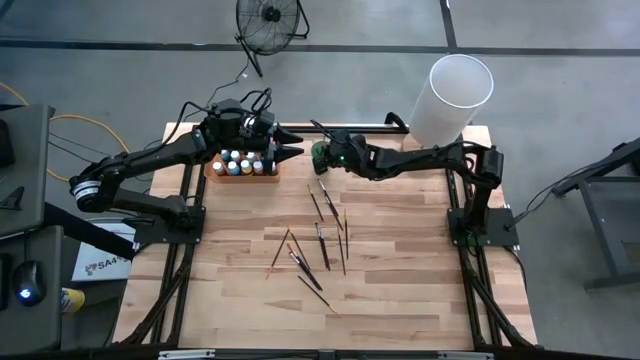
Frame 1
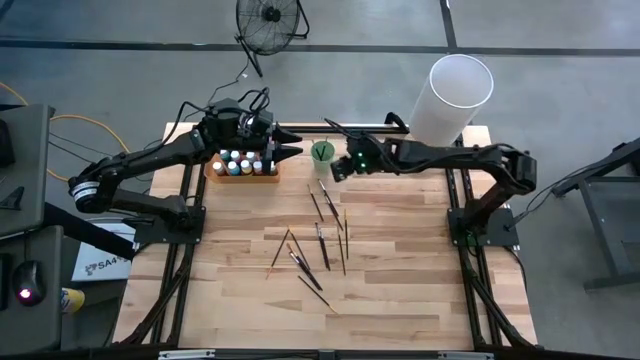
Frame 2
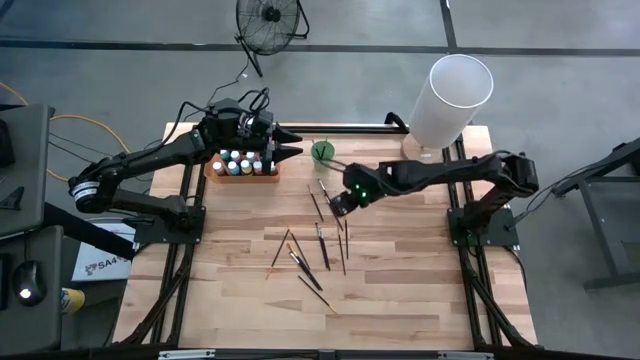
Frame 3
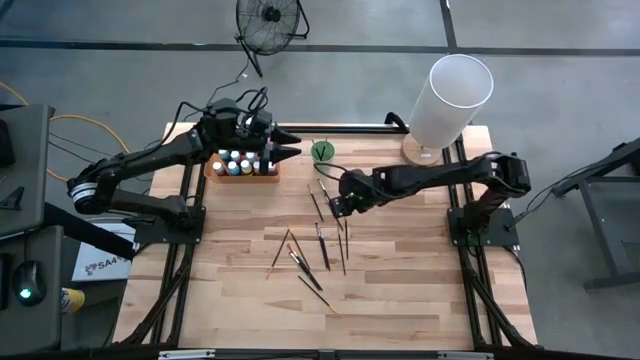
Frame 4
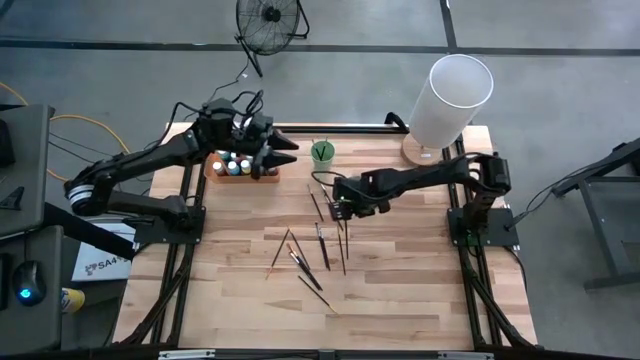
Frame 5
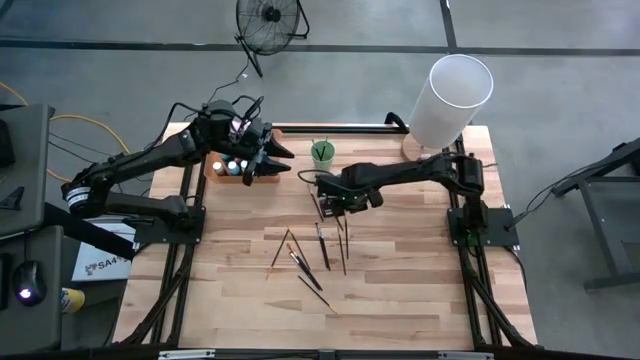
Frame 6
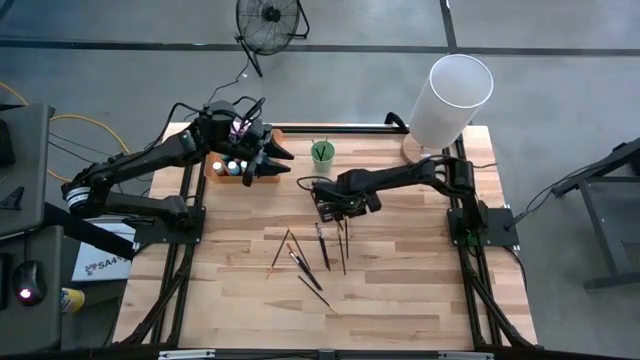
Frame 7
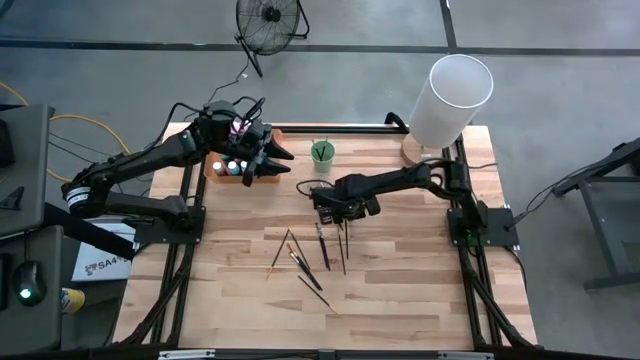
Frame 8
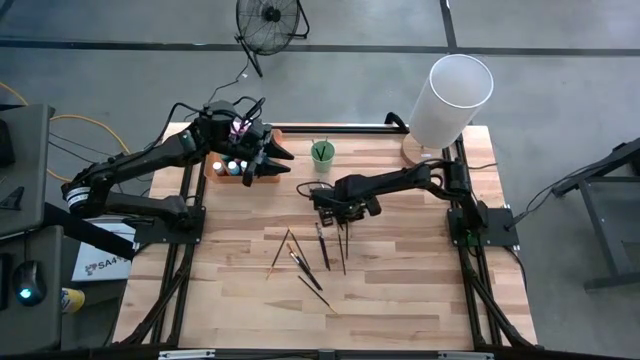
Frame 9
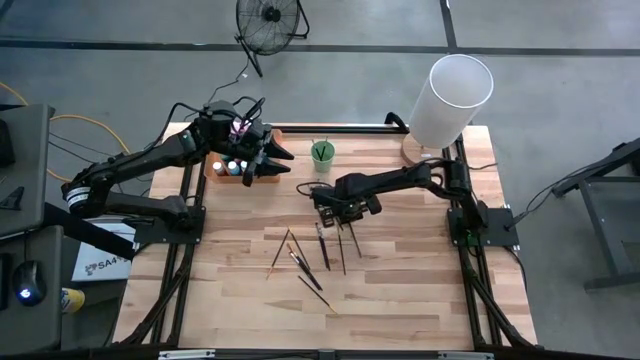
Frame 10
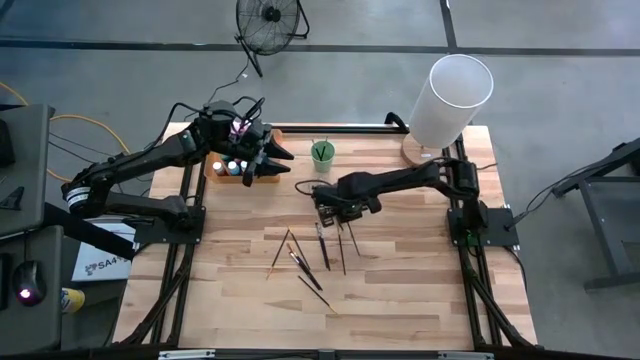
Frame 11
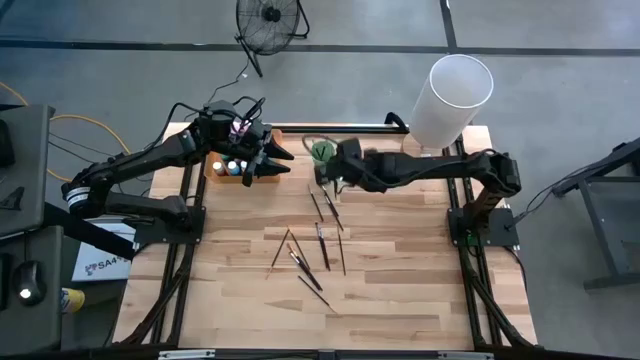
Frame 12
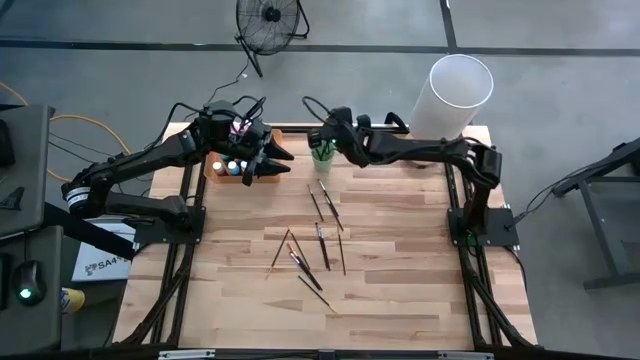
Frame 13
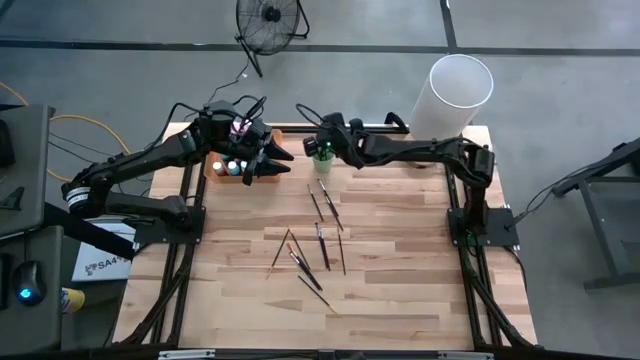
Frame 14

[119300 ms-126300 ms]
Task: Pick & Place Paint Supplies
Put the black paint brush into the green cup

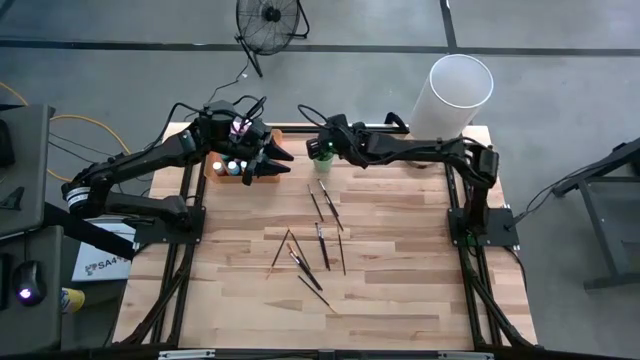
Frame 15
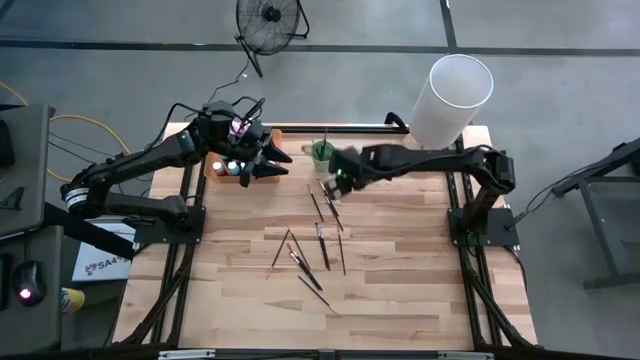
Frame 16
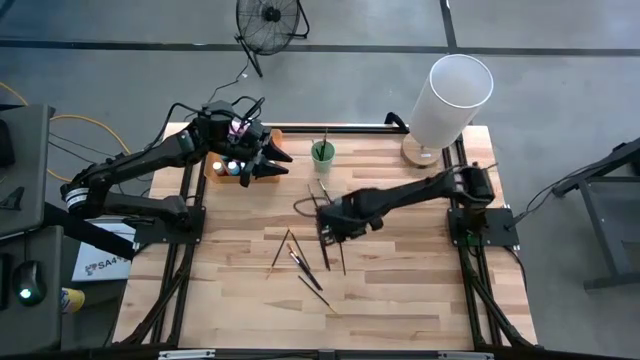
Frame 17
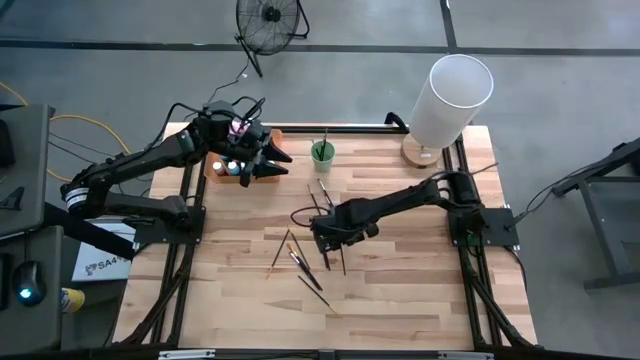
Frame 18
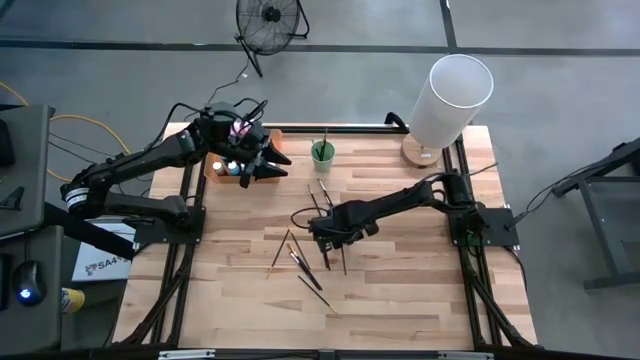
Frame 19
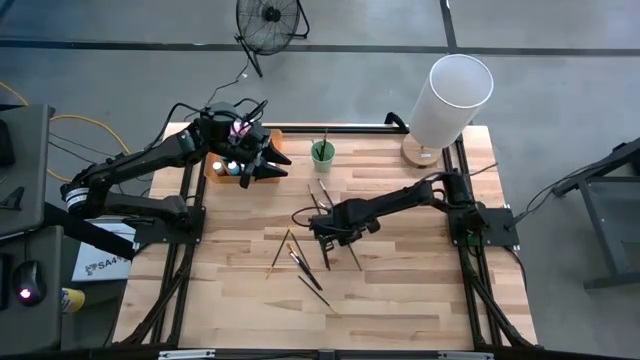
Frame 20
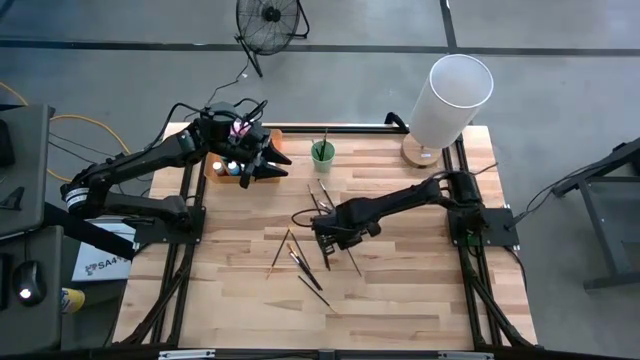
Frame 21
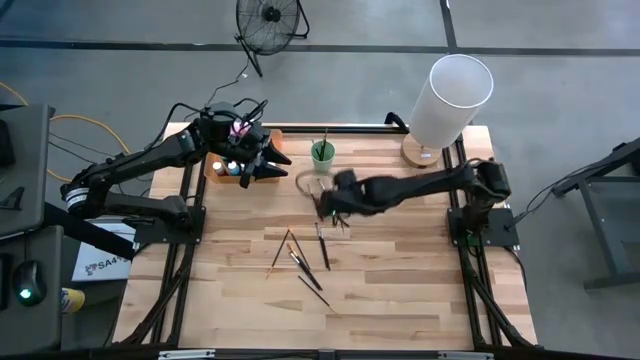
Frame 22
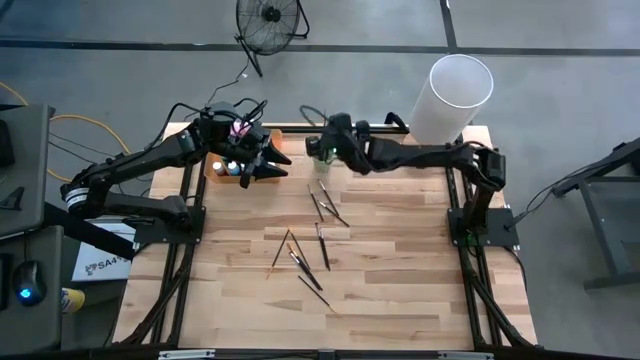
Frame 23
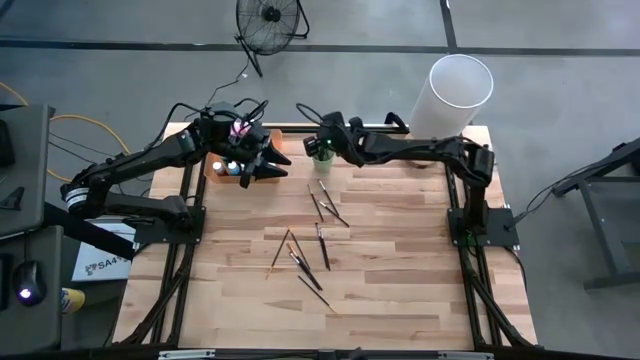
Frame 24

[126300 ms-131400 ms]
Put the black paint brush into the green cup

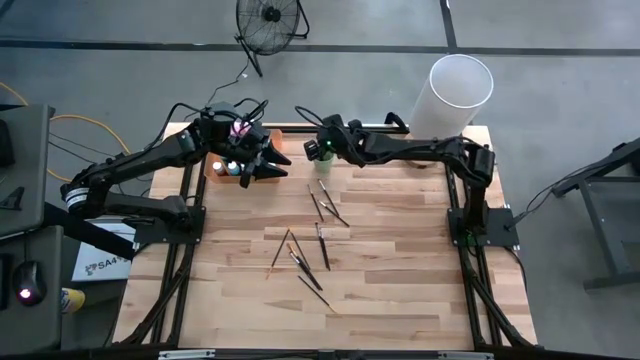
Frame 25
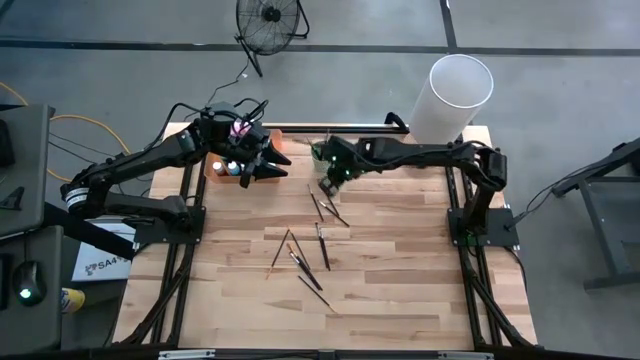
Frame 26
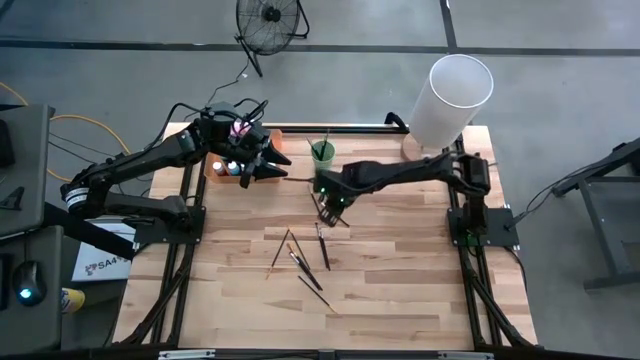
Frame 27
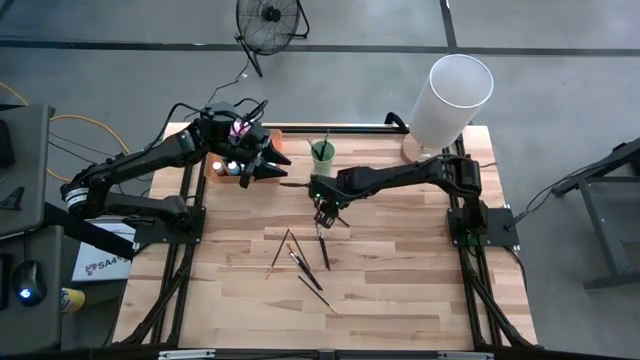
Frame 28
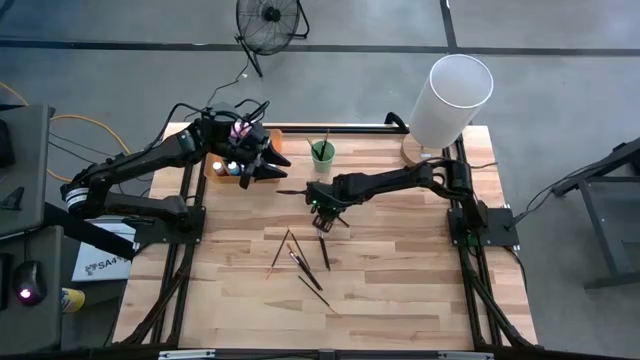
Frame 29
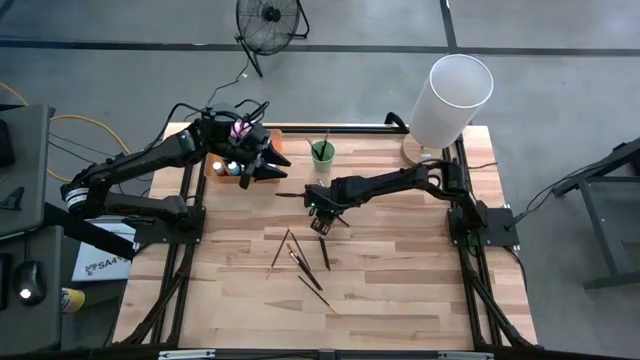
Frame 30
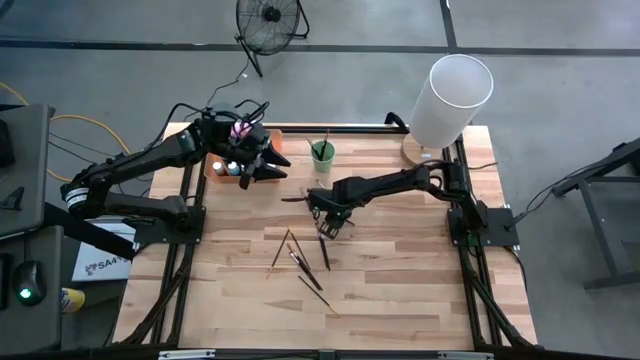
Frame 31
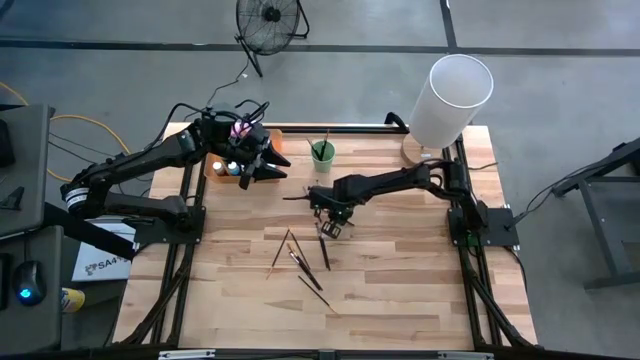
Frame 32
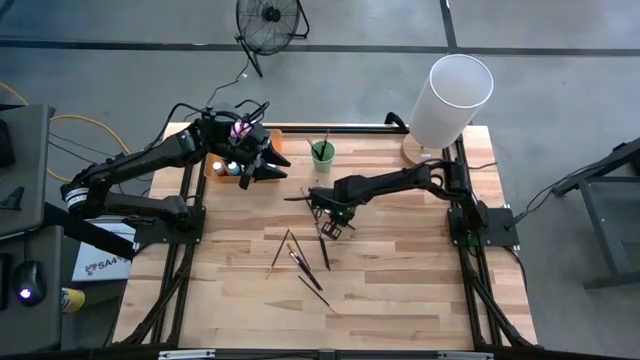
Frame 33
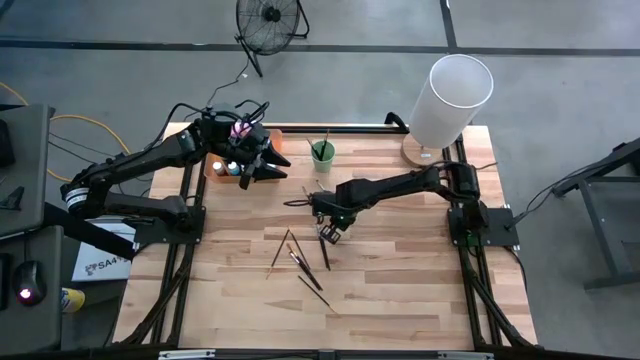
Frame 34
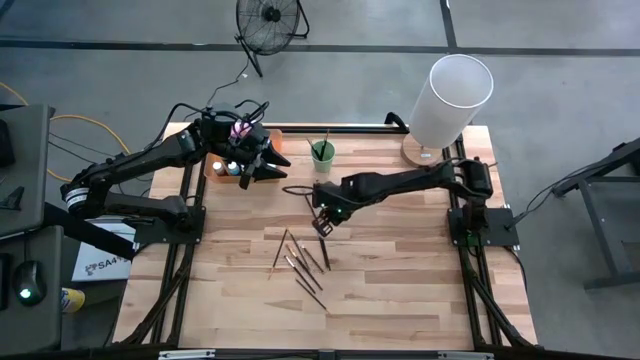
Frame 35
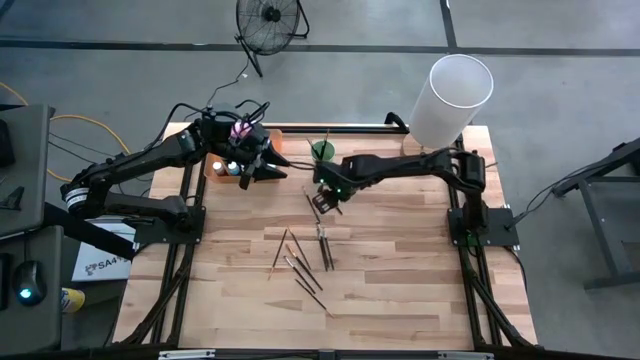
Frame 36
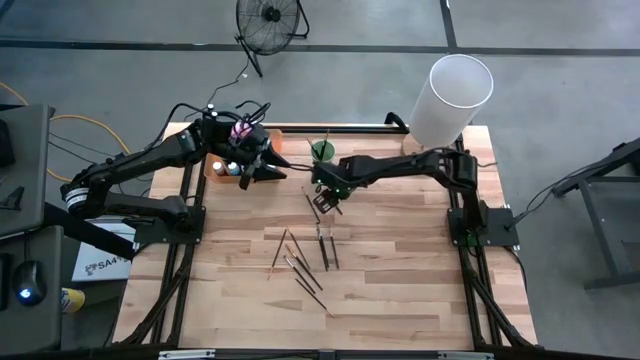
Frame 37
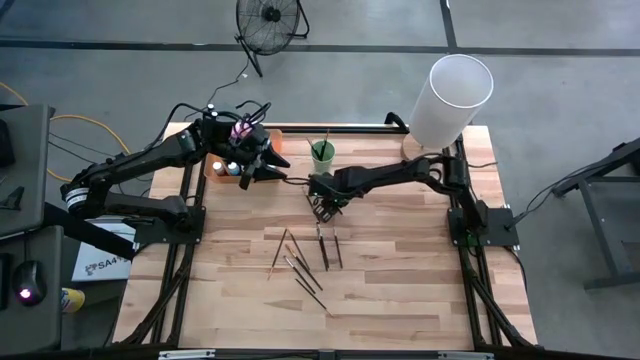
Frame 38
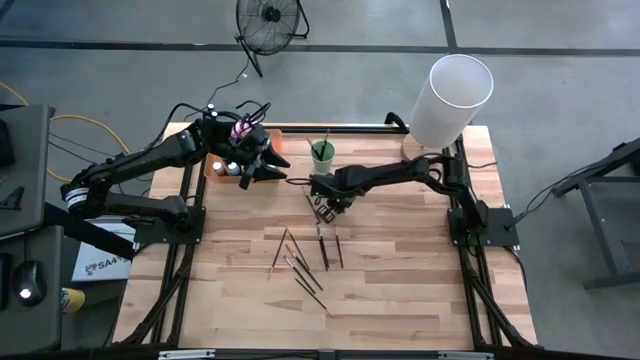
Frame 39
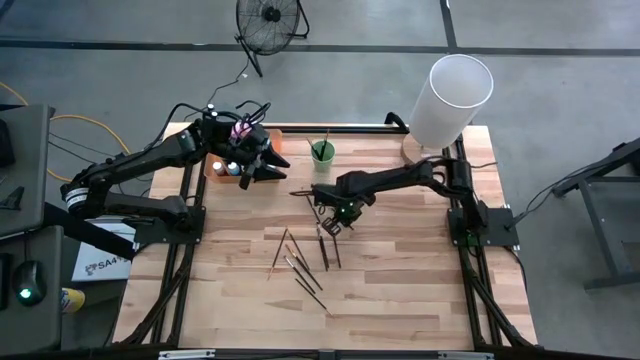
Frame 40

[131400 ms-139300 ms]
Put the black paint brush into the green cup

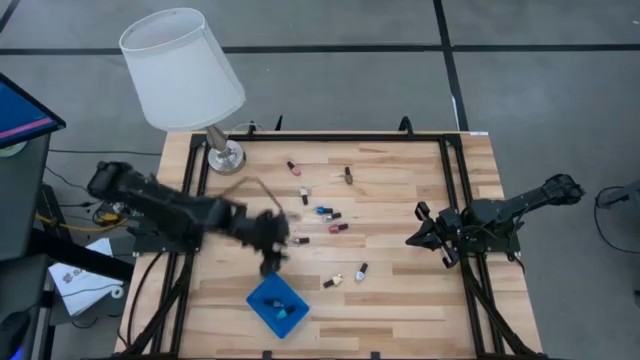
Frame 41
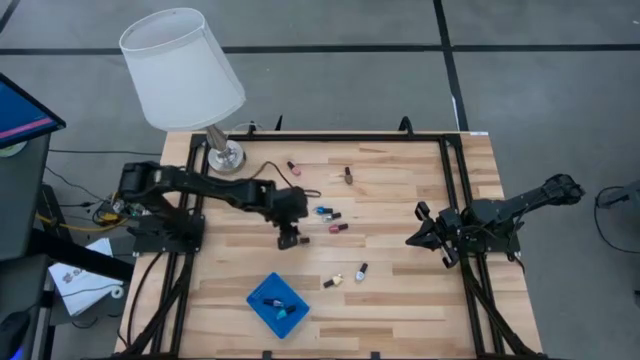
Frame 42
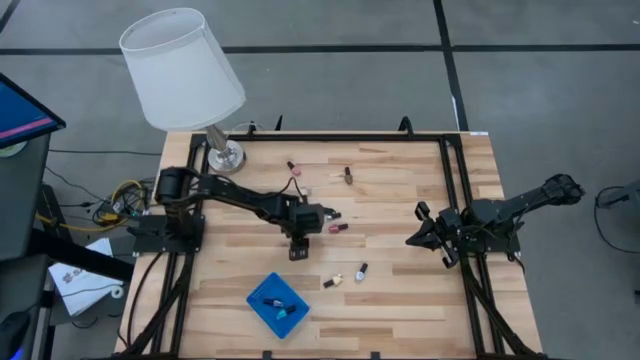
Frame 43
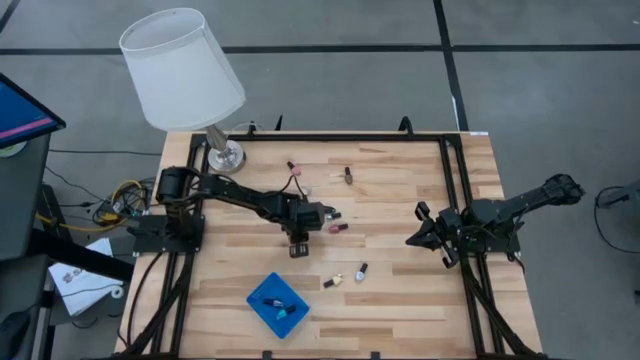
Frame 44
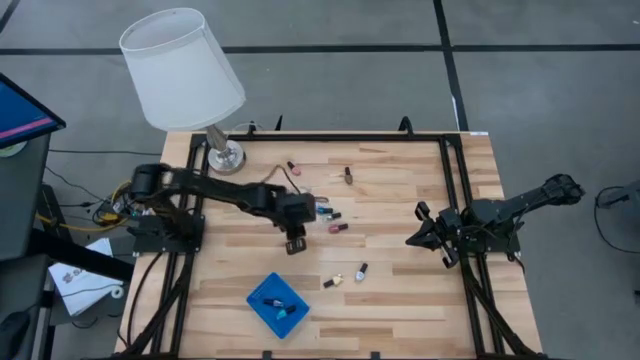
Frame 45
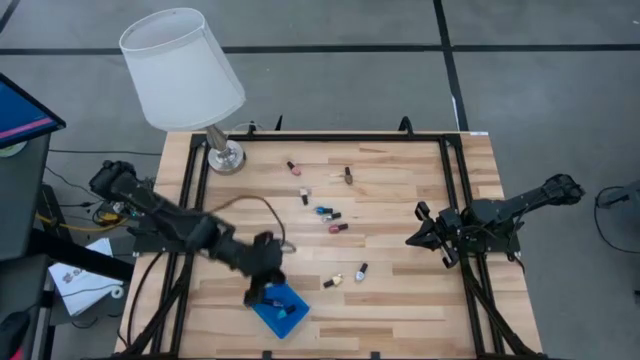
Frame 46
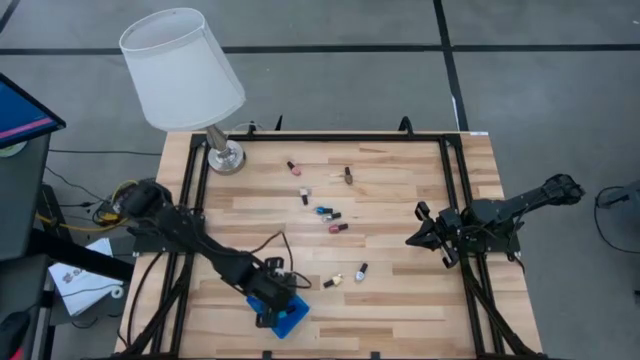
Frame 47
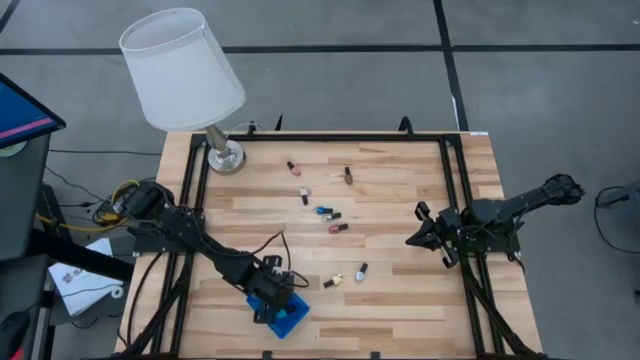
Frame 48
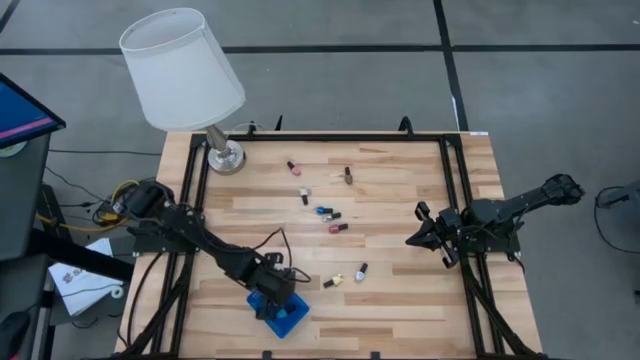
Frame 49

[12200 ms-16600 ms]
Task: Pick & Place Nail Polish
Put the left transparent nail polish bottle in the blue bin
